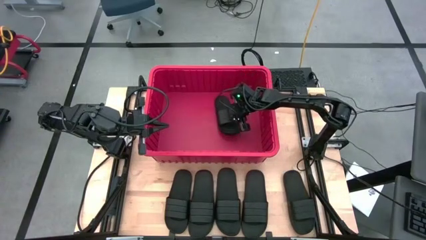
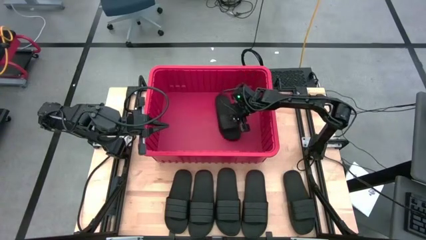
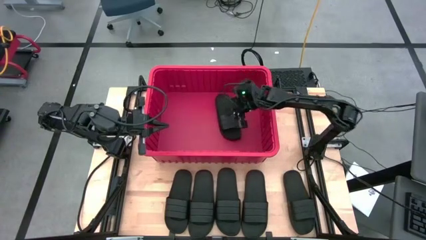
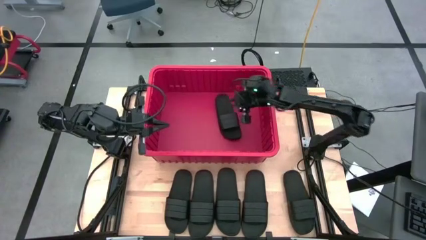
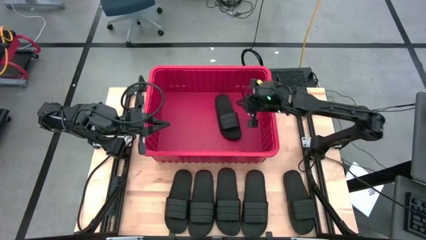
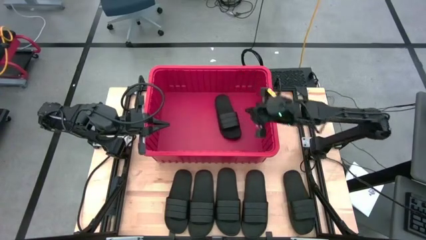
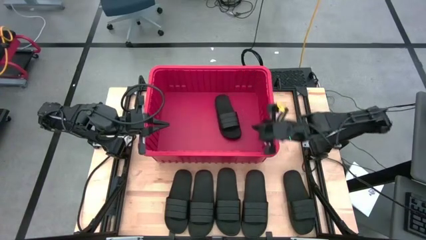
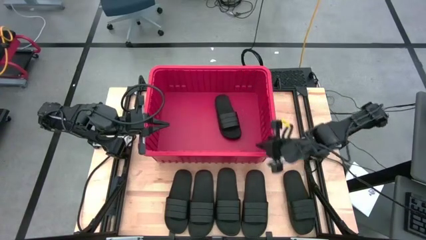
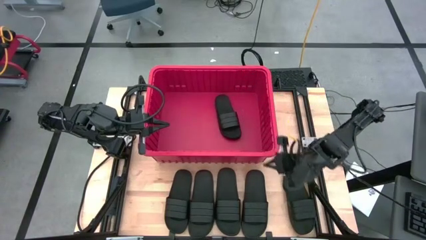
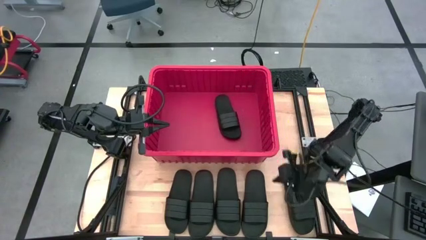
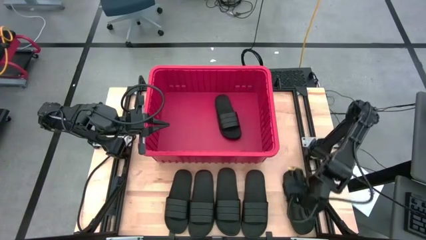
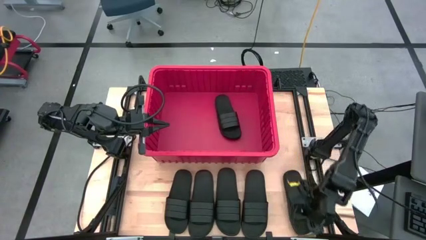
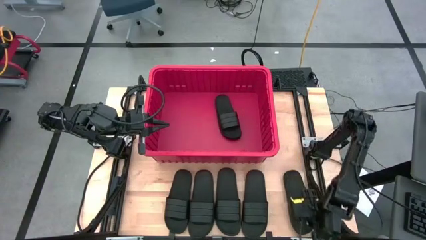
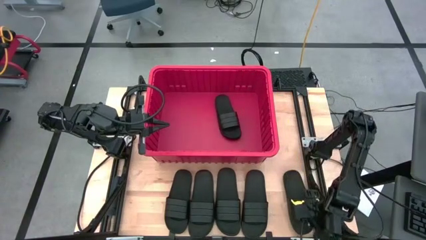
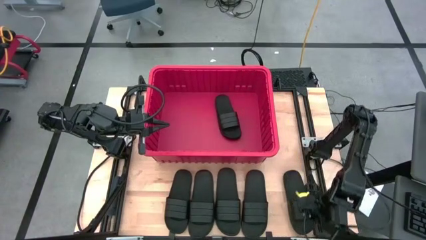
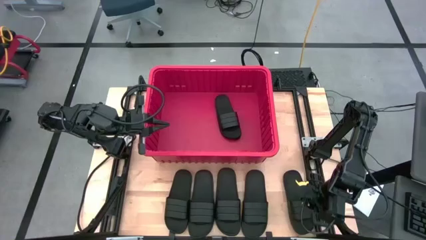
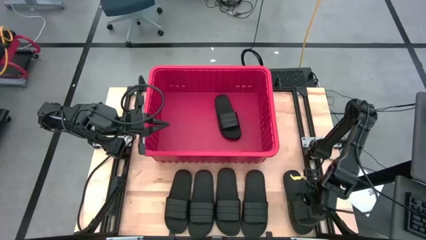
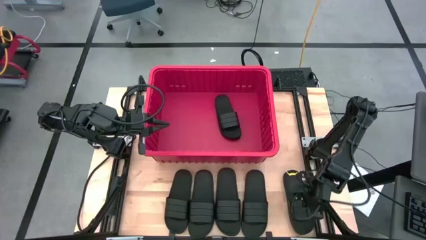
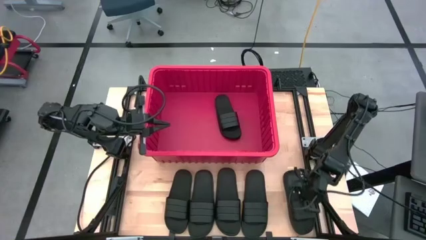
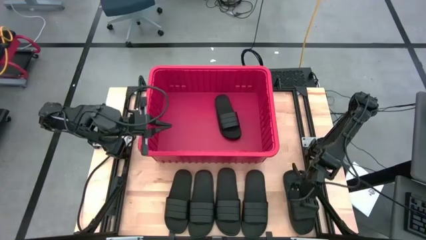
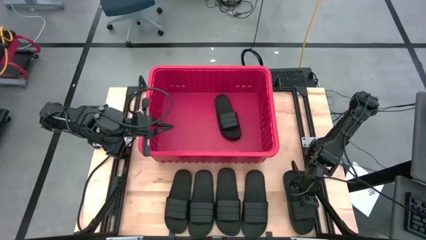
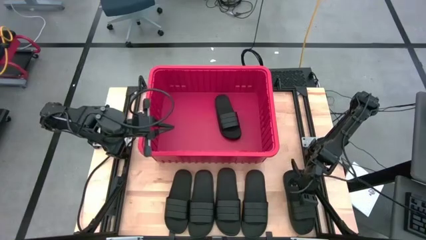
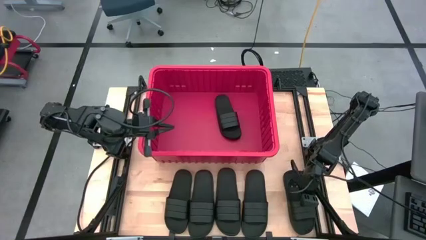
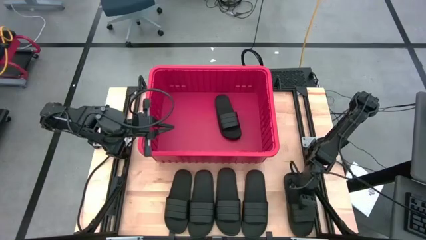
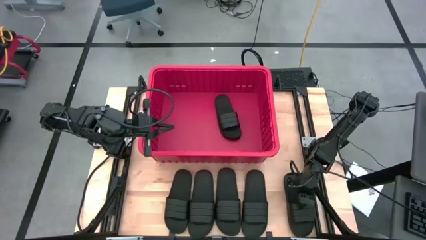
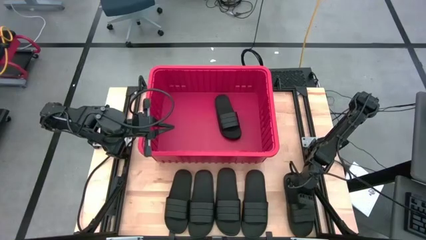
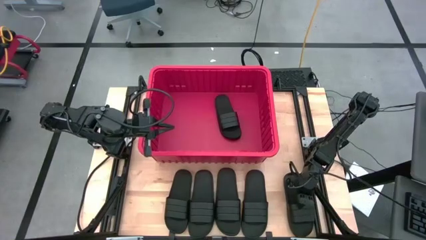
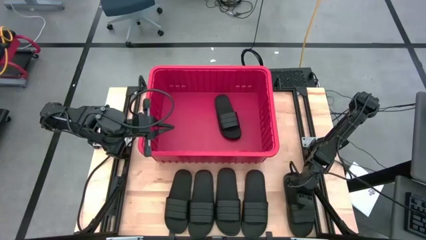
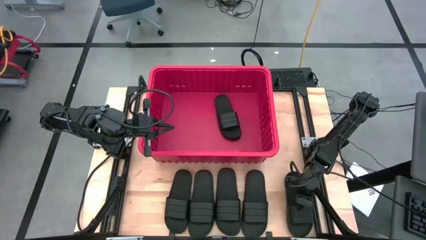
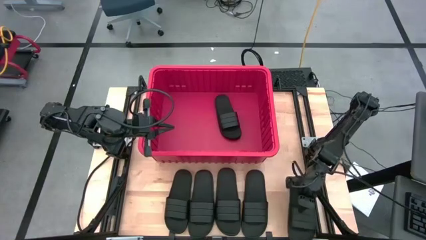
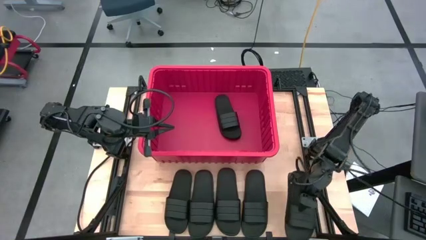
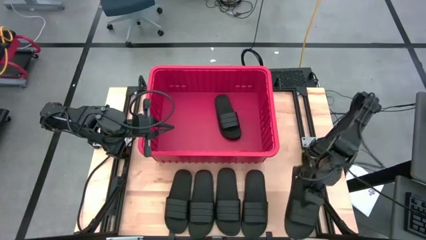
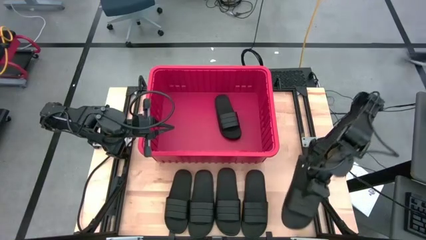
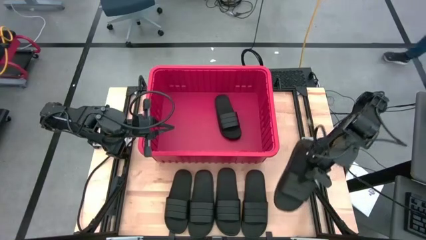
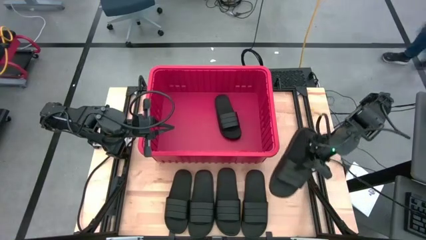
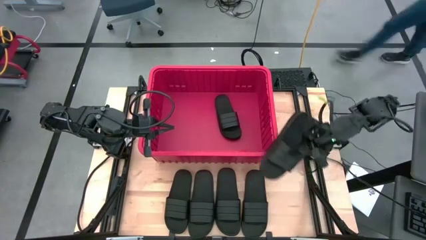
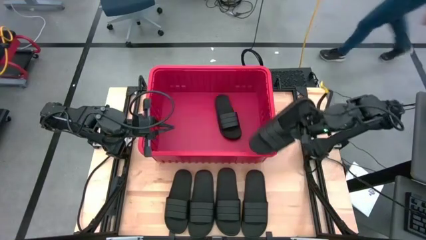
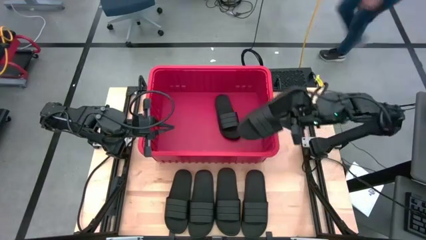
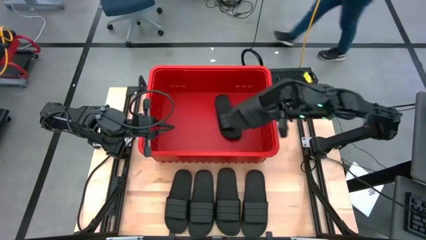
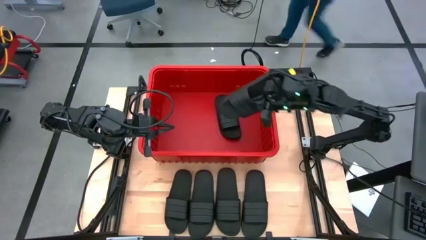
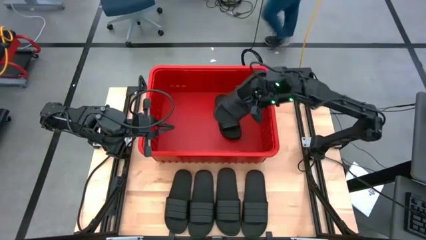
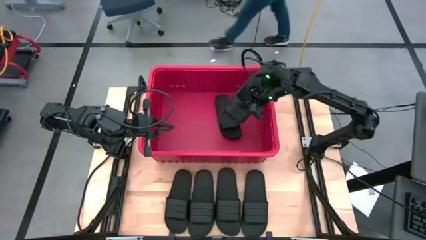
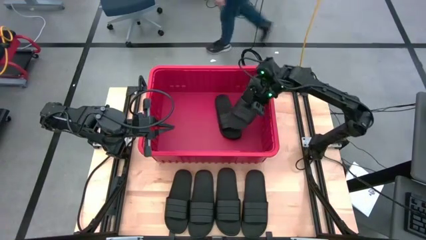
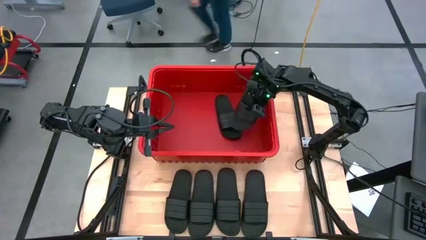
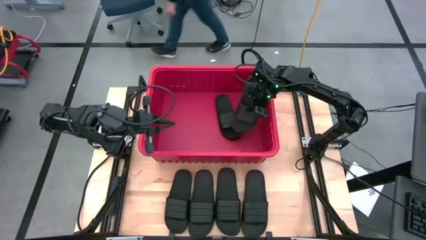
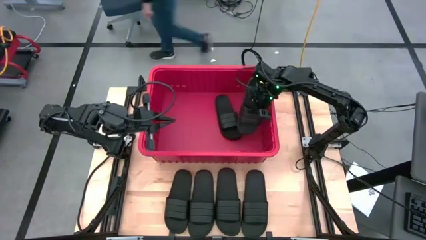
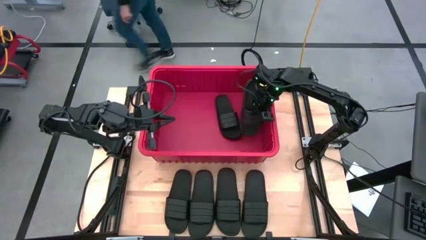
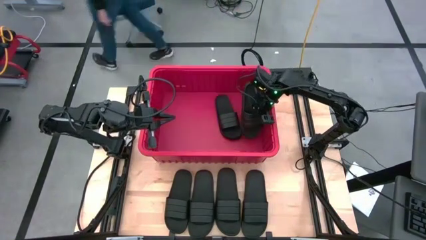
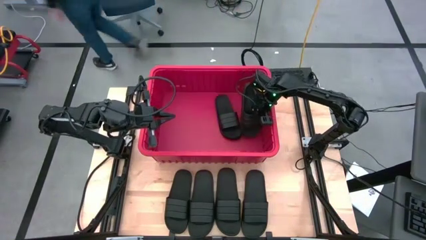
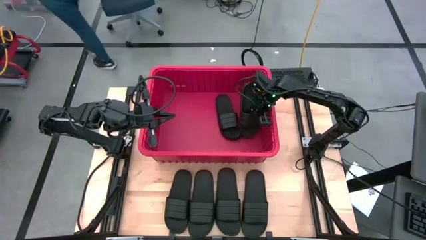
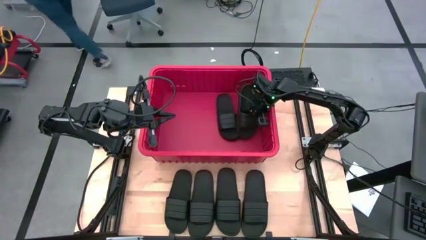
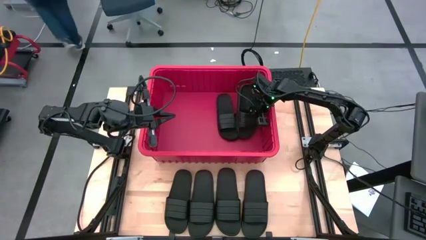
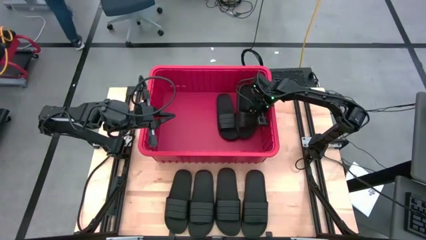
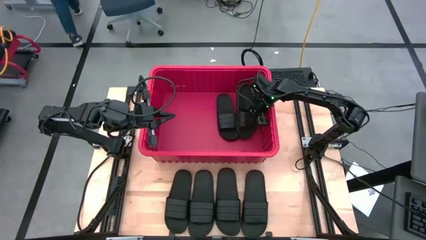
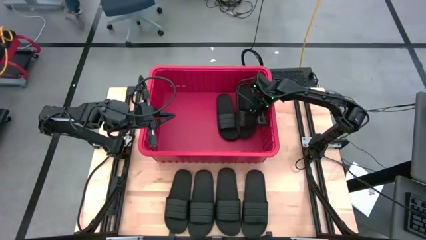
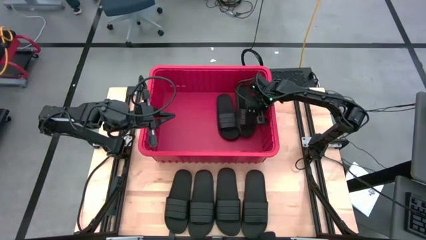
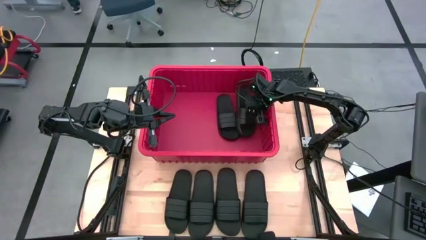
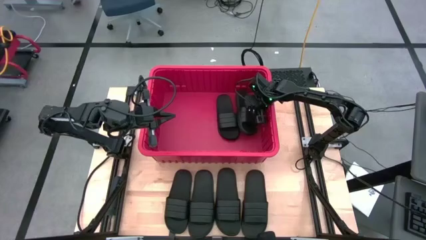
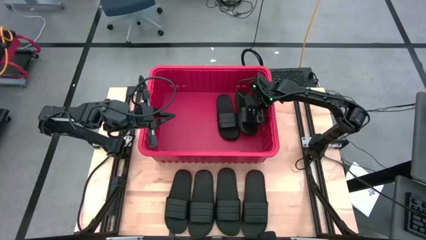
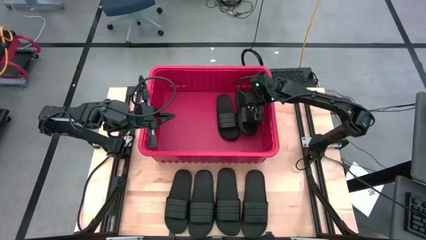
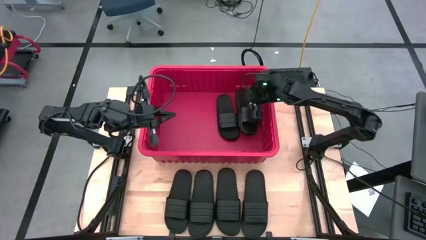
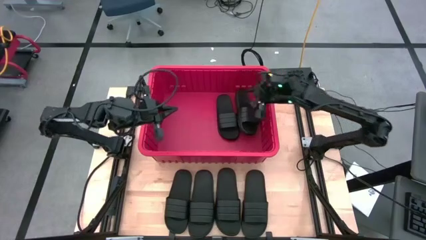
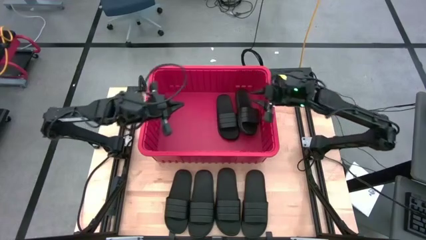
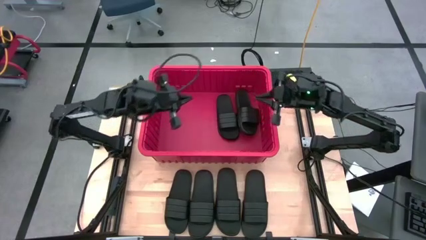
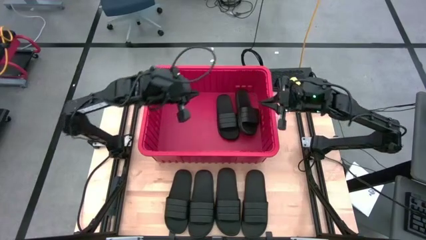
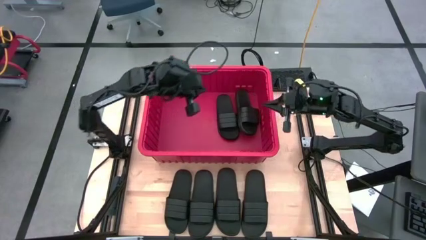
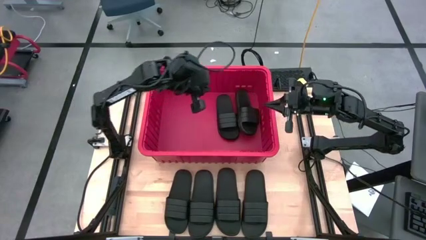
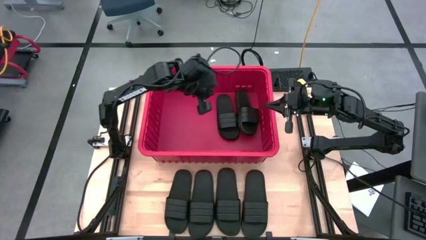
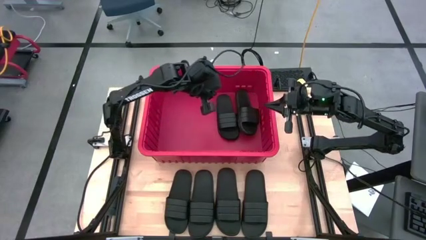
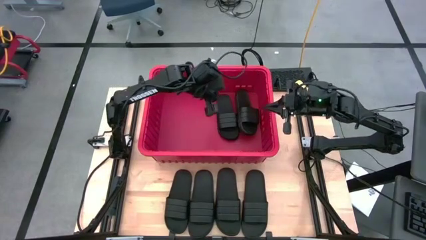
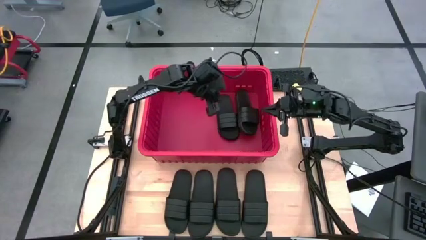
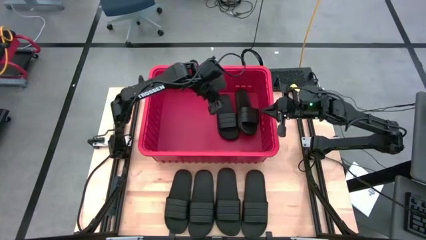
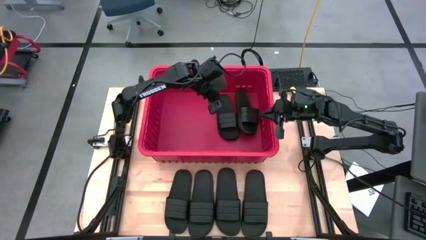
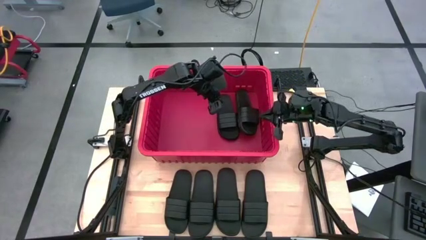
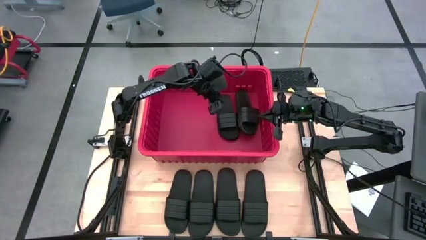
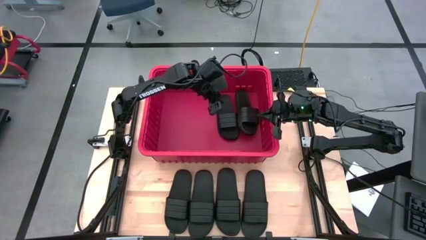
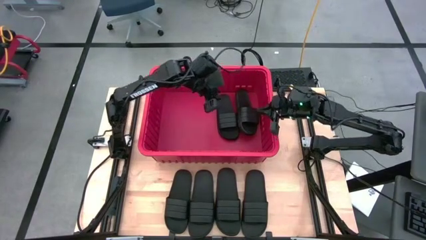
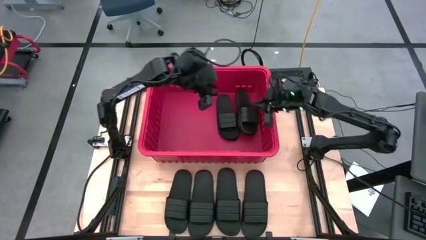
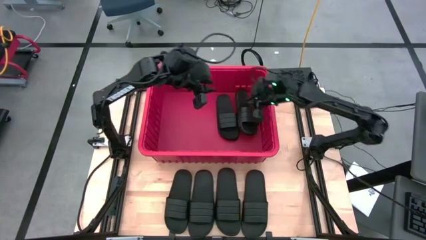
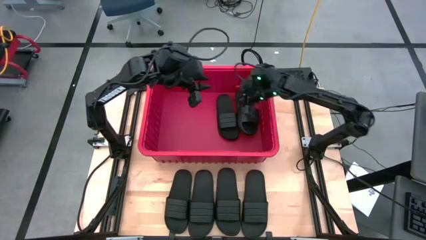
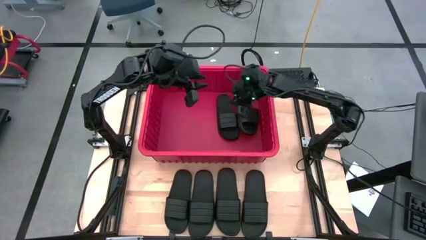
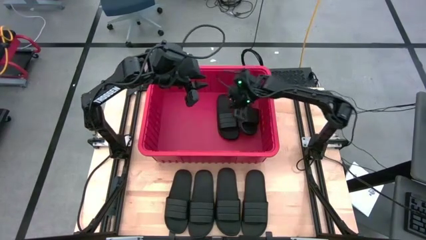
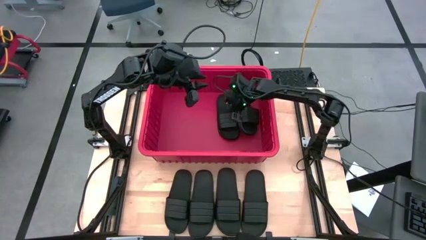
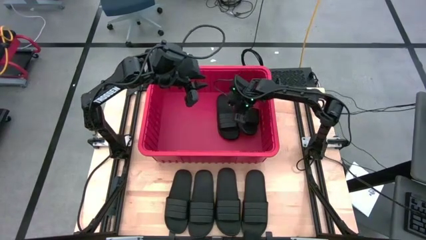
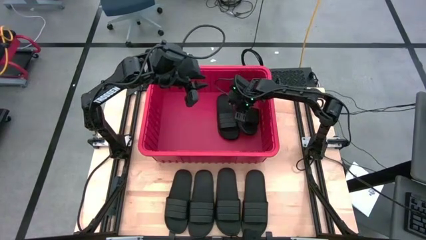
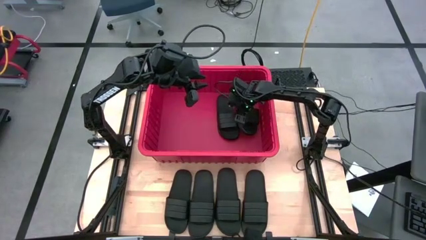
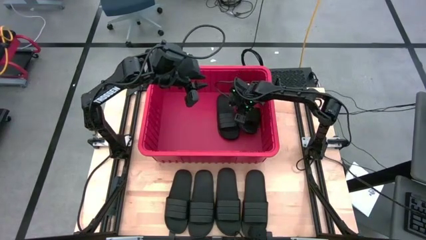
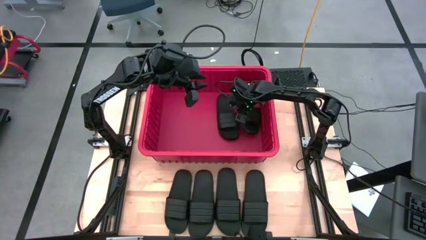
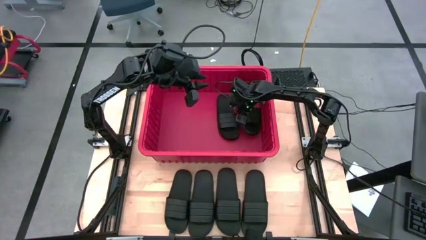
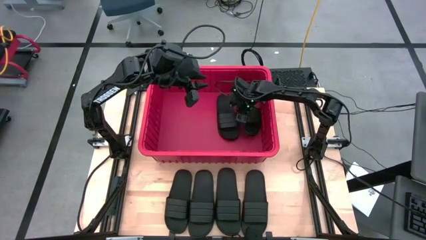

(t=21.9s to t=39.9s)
Task: Pick and place slides into bin
Put the black slide into the red bin
